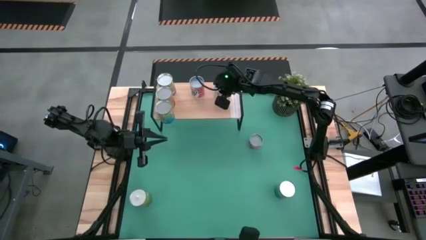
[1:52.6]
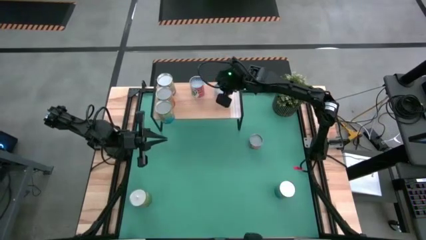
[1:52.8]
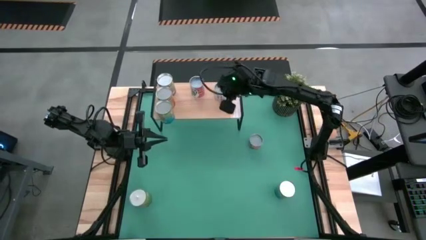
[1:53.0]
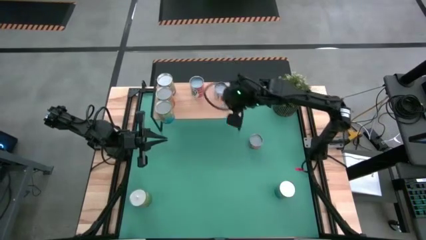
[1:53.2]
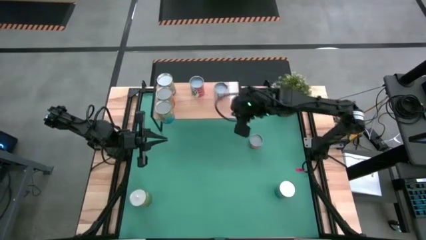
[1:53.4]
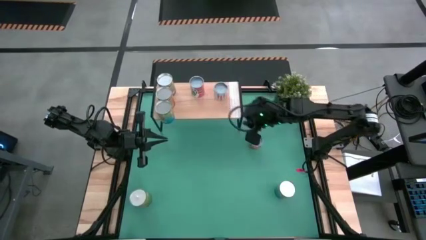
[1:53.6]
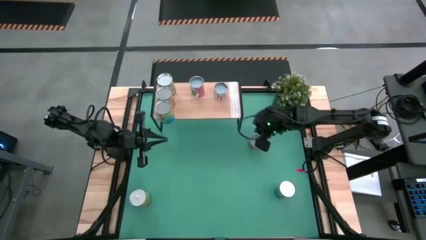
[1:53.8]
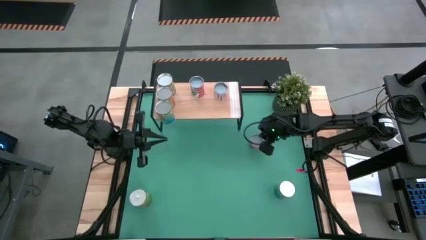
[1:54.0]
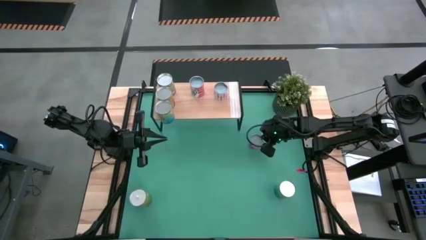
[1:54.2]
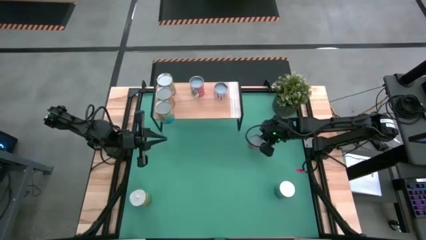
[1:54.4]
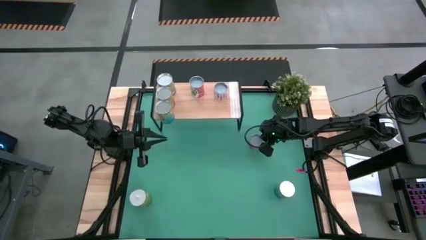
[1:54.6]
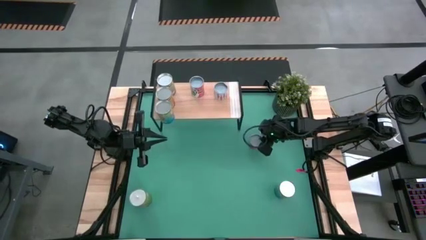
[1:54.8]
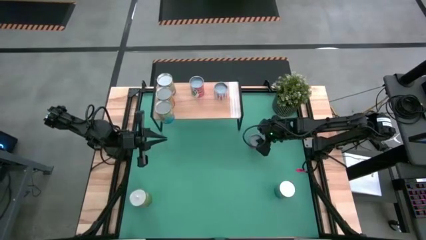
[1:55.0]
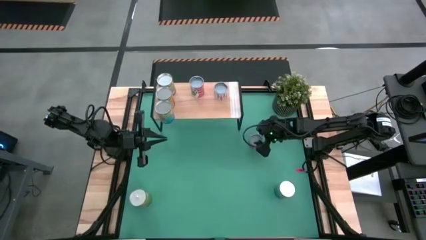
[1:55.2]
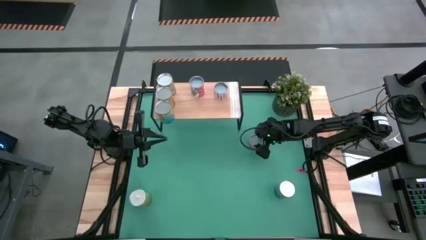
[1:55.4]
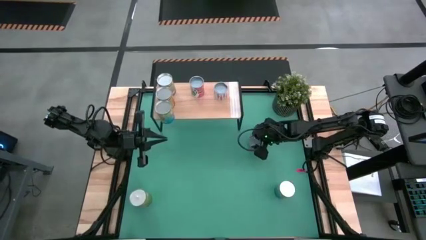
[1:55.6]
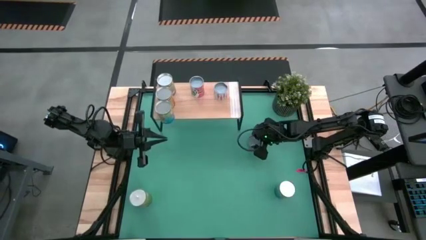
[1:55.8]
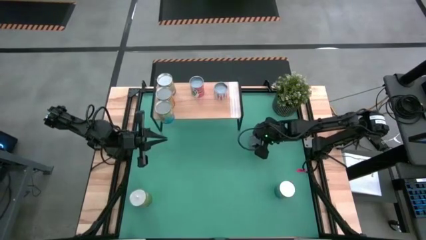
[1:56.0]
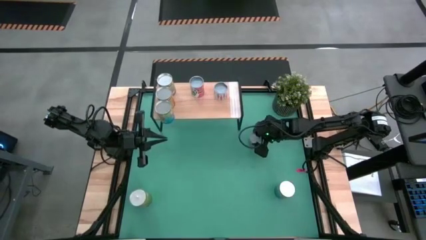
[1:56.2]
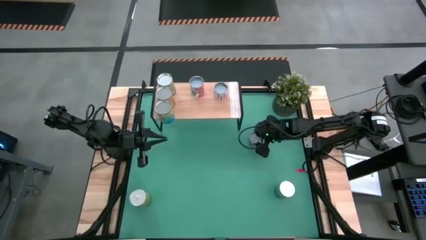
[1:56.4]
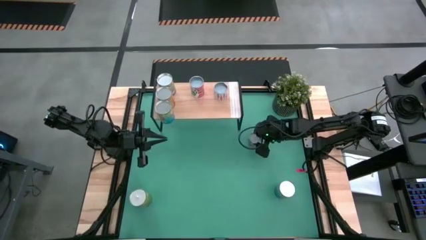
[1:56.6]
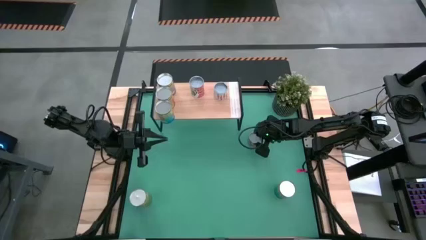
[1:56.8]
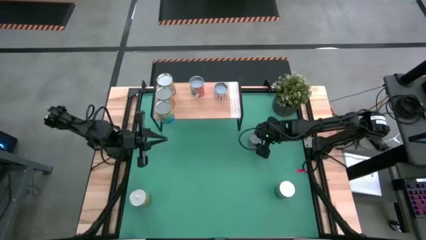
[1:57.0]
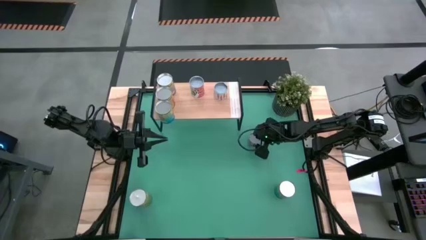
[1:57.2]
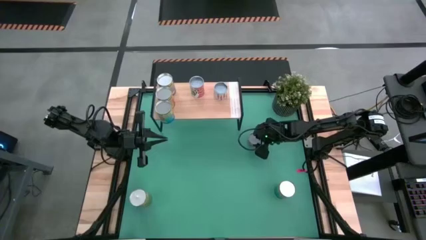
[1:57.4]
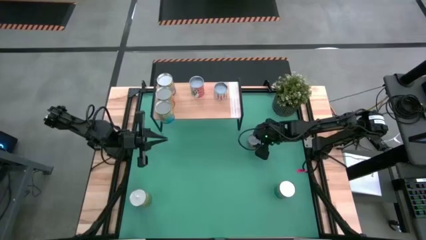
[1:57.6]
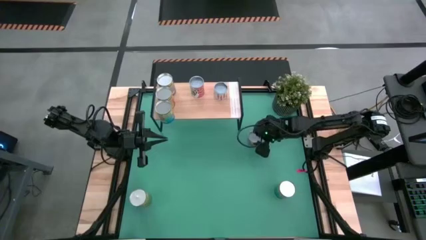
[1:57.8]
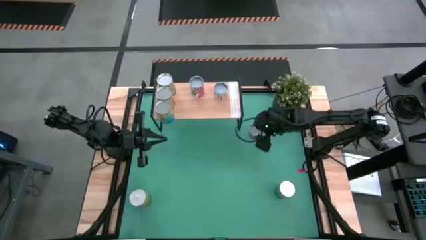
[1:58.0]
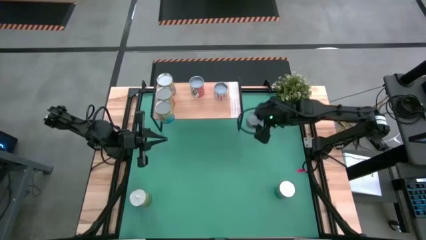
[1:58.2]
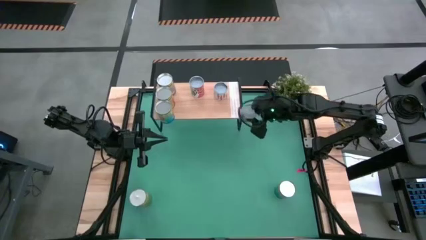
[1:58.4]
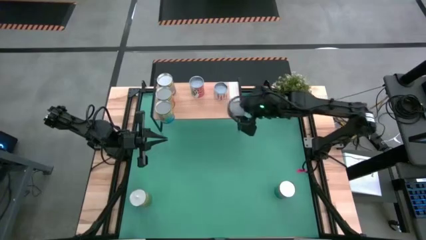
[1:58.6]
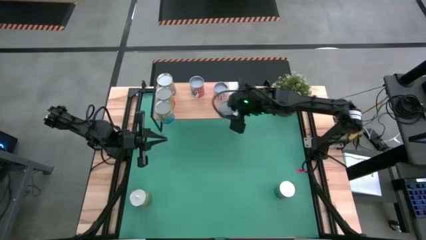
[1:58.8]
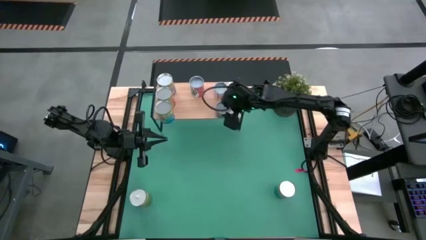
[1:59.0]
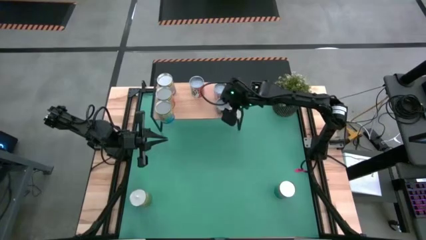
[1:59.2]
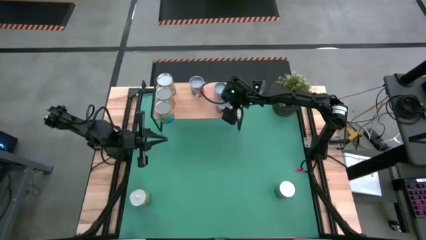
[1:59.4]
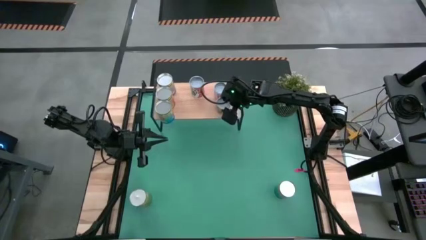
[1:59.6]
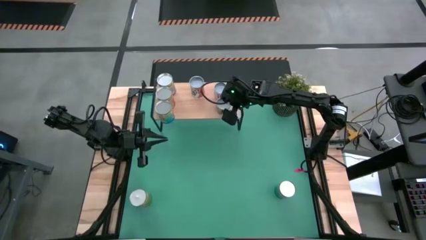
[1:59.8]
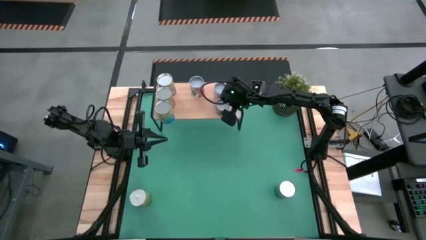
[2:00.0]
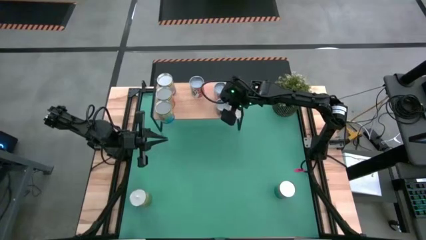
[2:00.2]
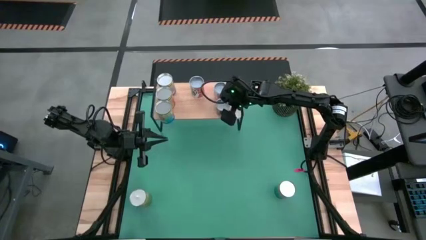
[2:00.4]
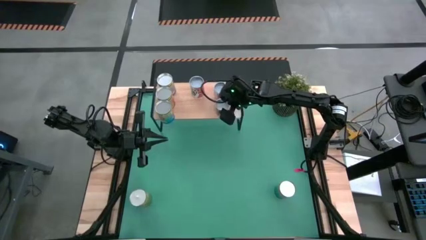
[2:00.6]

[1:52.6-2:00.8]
Task: Pick and place cans onto a shelf
Put the small canned oranges on the shelf

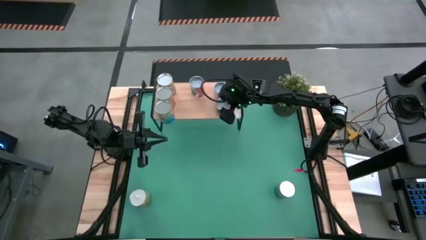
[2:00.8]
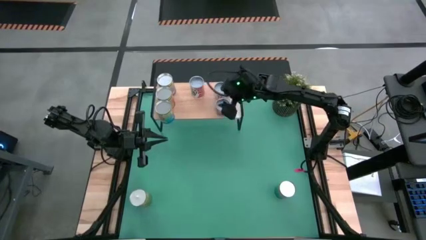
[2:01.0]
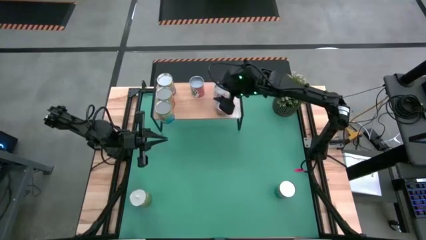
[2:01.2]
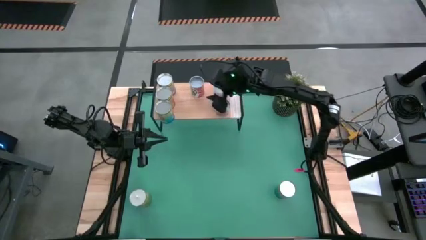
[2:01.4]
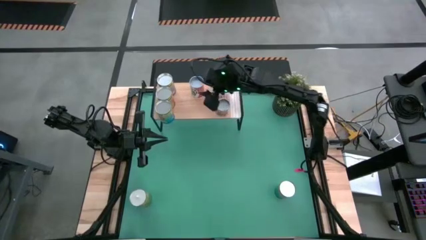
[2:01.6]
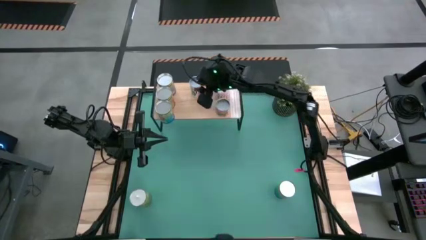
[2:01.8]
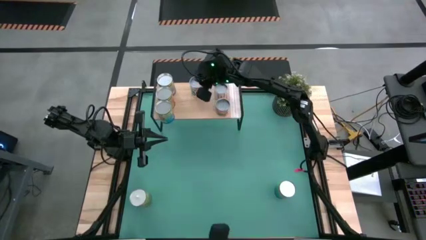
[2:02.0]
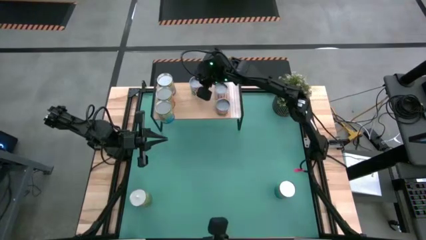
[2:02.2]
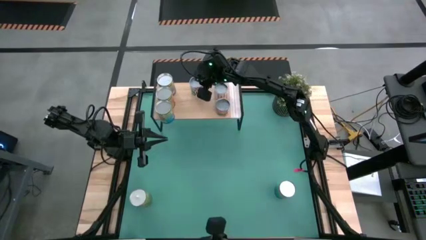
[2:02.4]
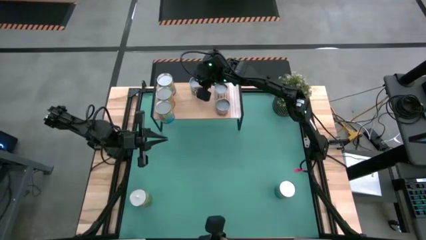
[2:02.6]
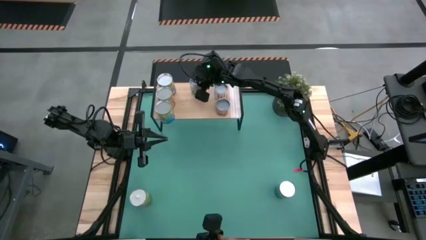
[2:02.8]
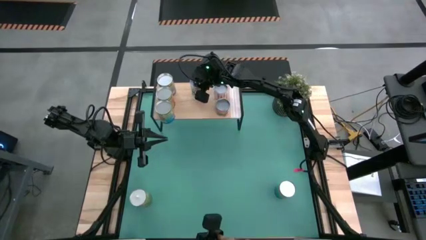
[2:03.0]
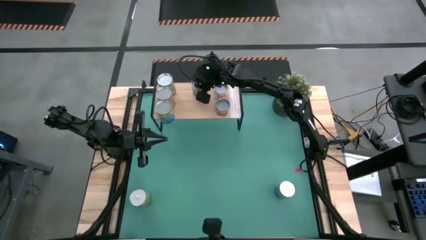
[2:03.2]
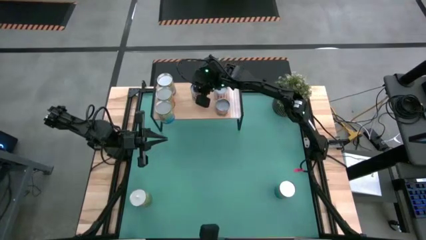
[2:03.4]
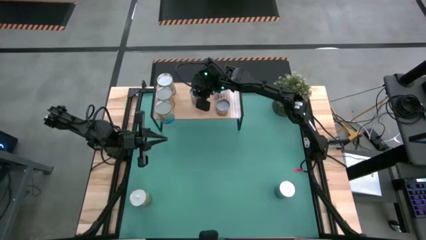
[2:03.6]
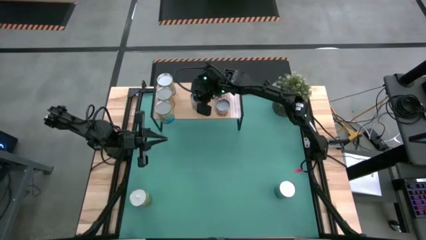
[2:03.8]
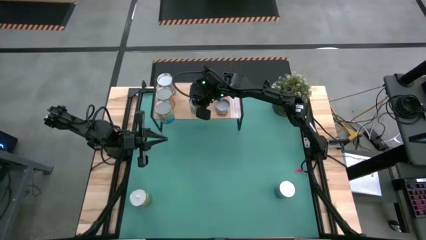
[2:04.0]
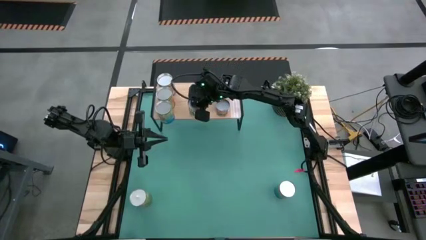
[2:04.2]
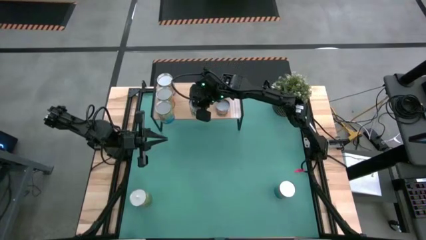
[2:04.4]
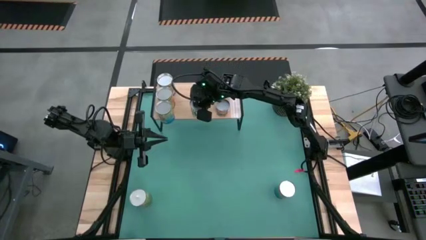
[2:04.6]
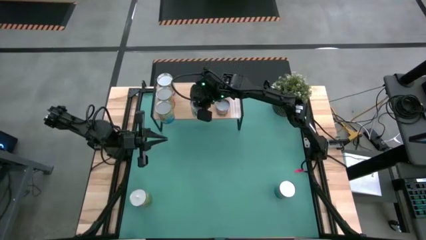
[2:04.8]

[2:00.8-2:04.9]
Adjust the canned mixed fruit on the shelf

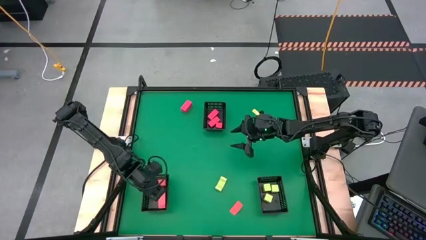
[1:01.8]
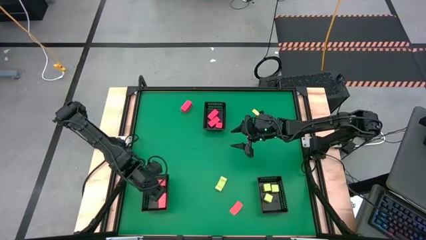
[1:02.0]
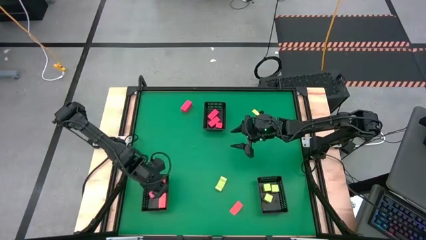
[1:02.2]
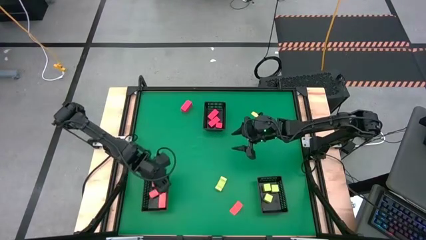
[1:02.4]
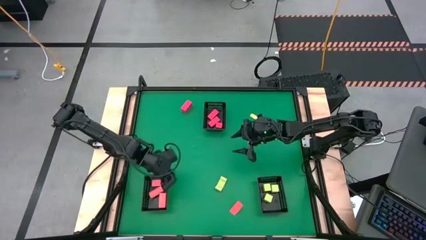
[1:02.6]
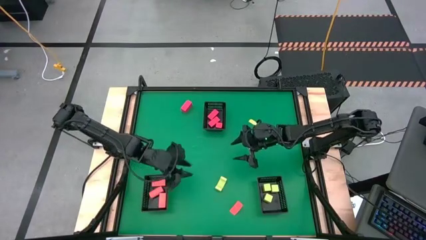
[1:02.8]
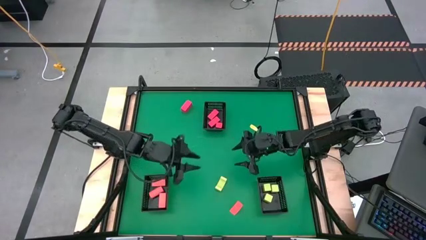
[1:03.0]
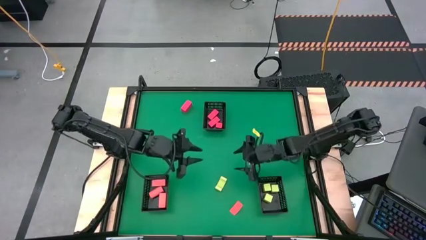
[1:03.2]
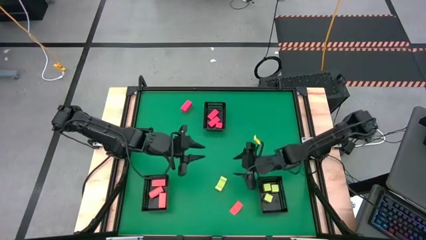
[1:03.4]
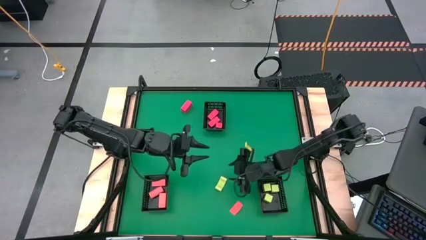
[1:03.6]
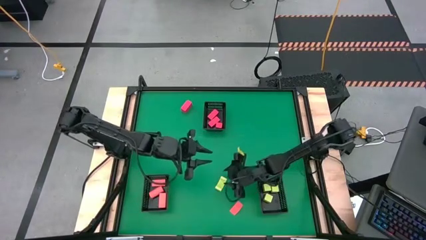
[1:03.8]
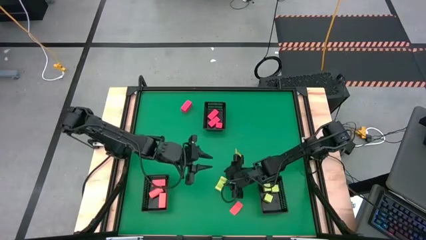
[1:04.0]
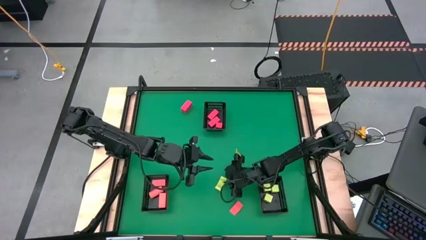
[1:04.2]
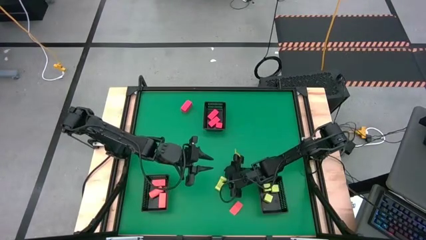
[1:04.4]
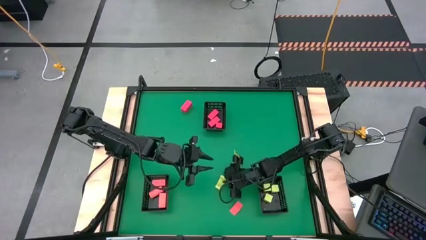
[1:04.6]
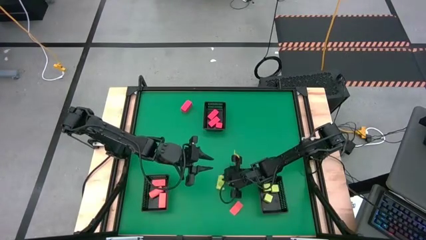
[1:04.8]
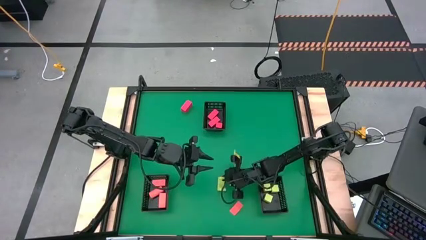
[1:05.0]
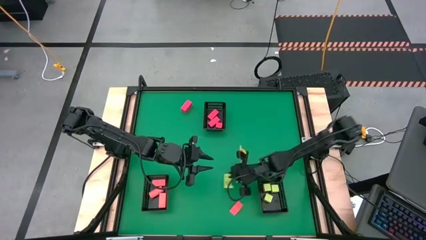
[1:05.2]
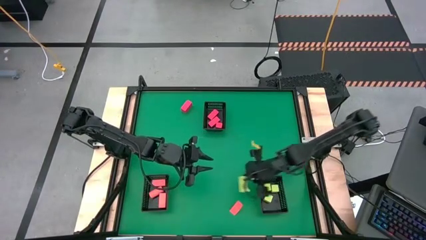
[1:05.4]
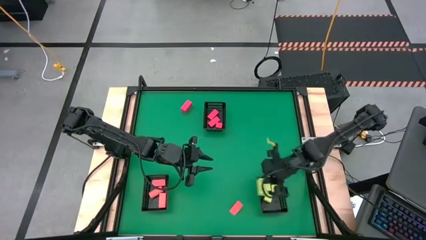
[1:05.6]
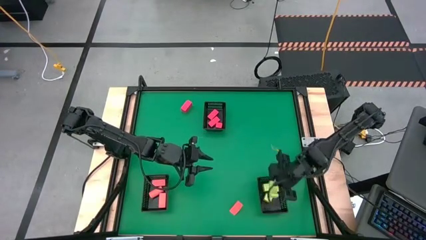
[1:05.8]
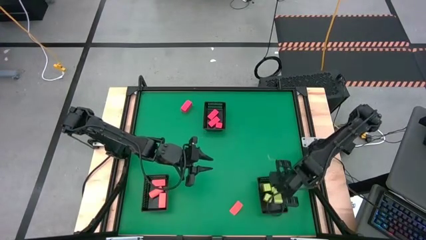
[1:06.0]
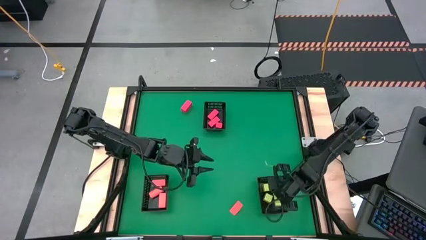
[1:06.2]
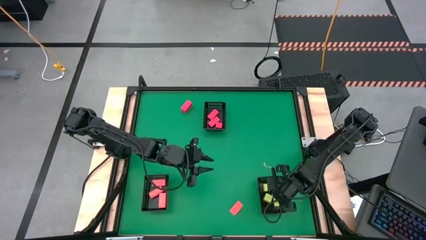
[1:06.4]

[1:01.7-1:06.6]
Task: Sort & place blocks by color
Put the green block into the bottom right black bin
